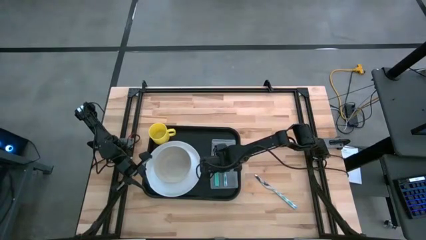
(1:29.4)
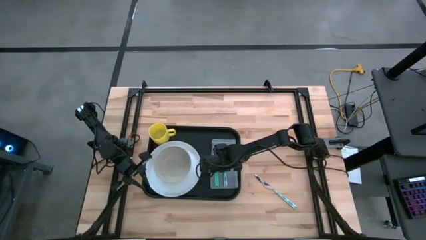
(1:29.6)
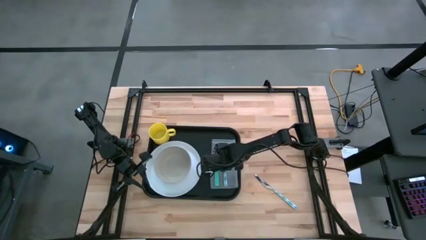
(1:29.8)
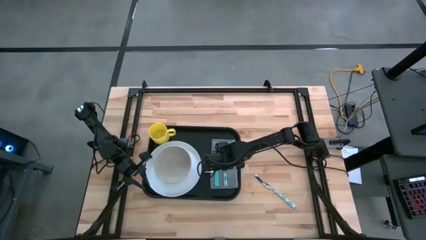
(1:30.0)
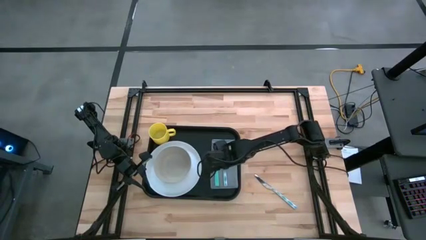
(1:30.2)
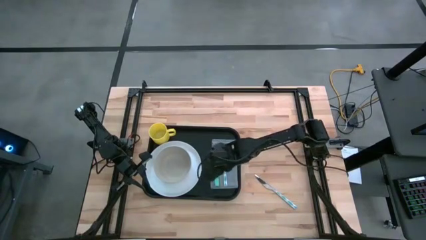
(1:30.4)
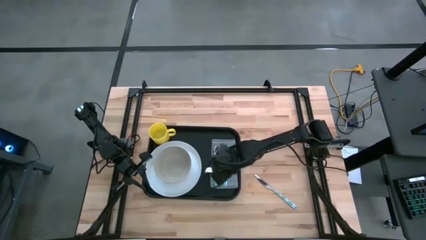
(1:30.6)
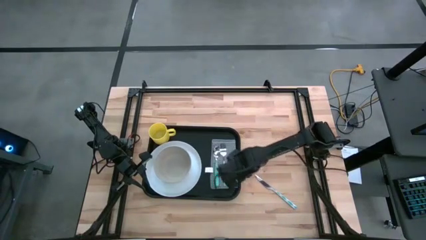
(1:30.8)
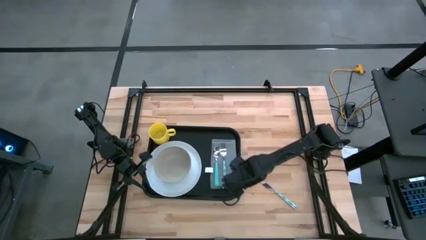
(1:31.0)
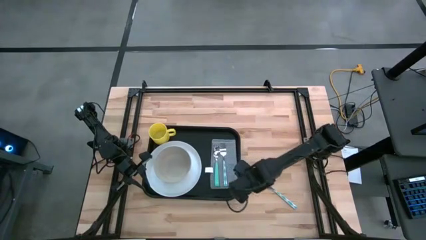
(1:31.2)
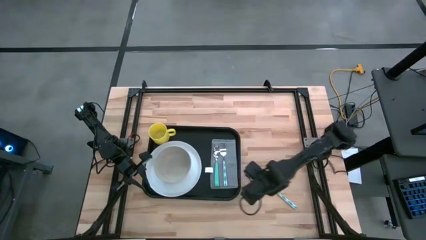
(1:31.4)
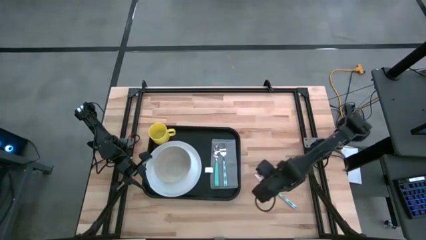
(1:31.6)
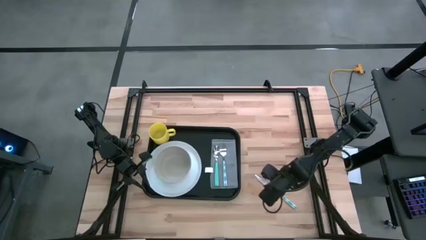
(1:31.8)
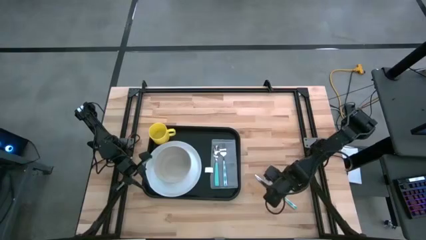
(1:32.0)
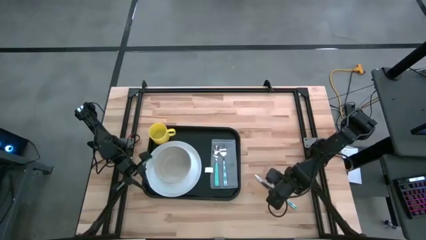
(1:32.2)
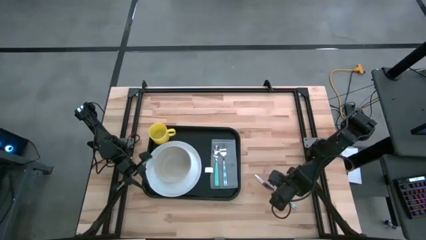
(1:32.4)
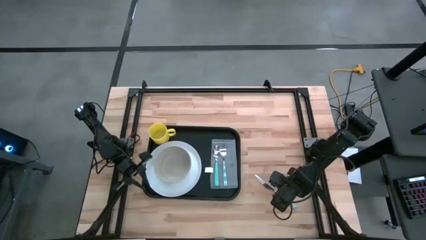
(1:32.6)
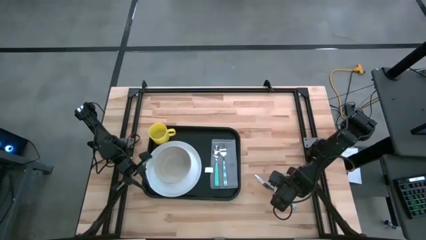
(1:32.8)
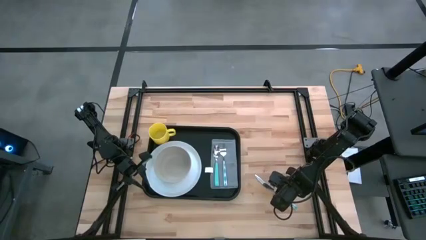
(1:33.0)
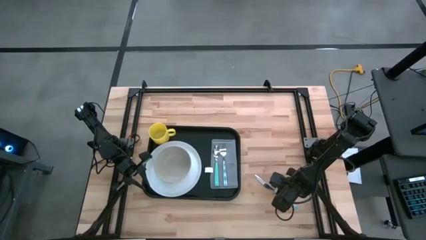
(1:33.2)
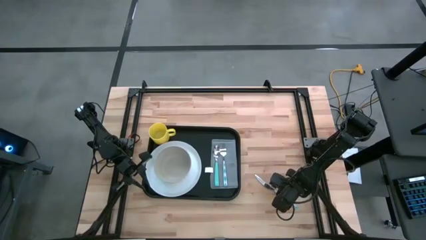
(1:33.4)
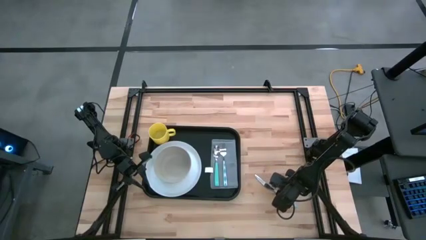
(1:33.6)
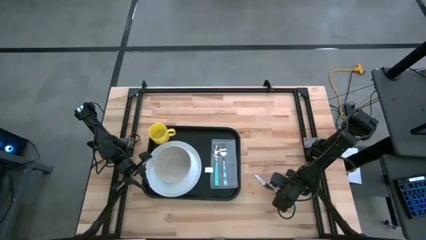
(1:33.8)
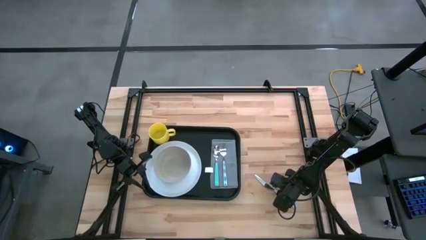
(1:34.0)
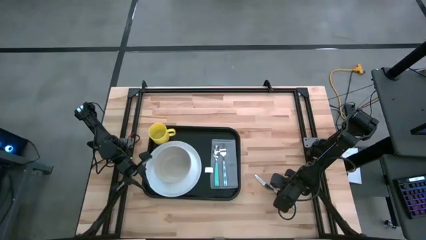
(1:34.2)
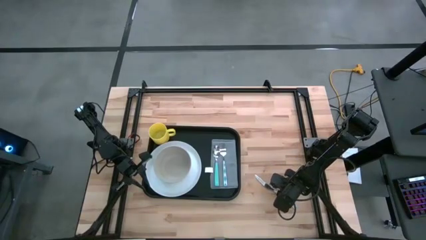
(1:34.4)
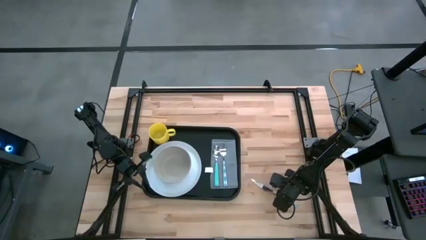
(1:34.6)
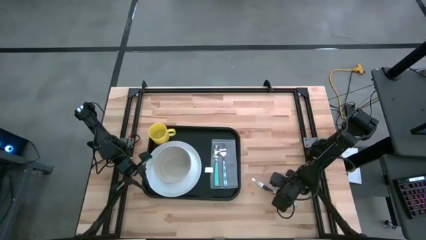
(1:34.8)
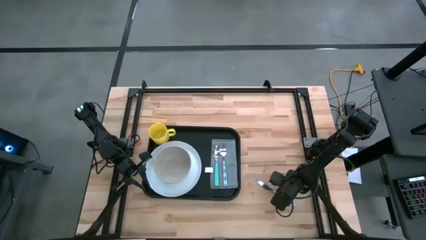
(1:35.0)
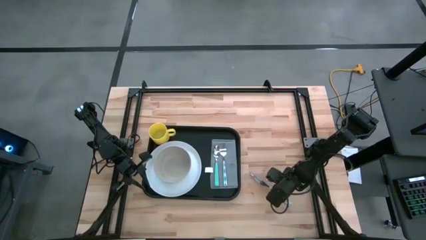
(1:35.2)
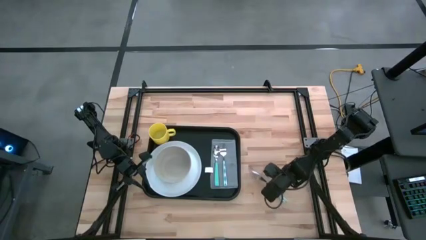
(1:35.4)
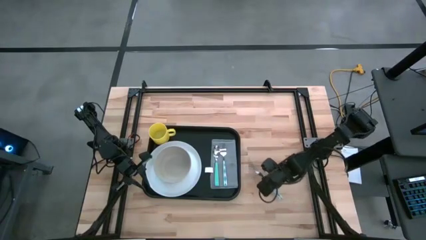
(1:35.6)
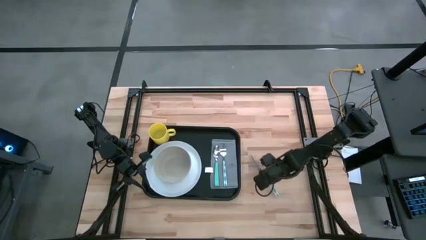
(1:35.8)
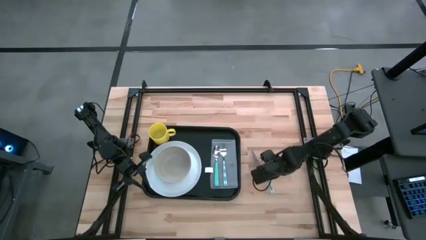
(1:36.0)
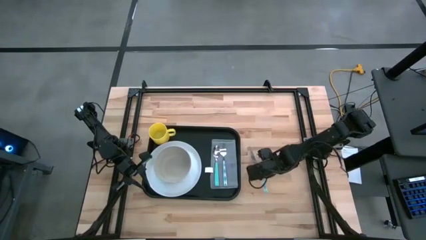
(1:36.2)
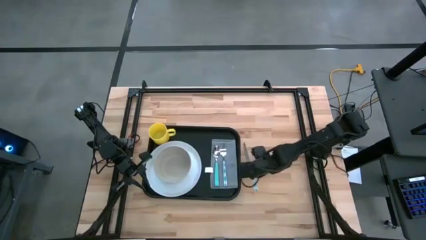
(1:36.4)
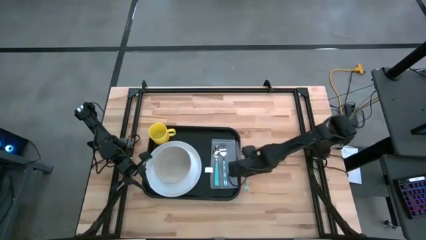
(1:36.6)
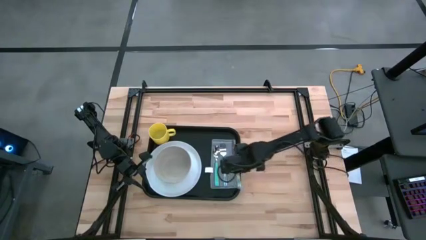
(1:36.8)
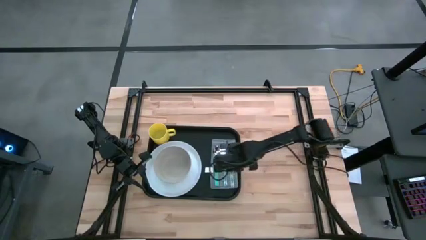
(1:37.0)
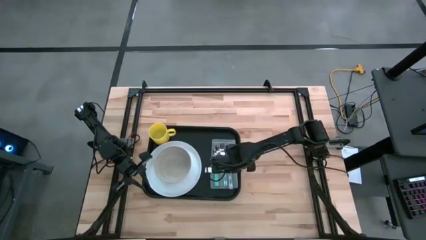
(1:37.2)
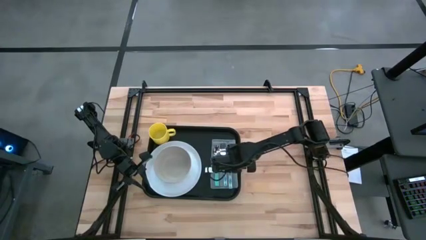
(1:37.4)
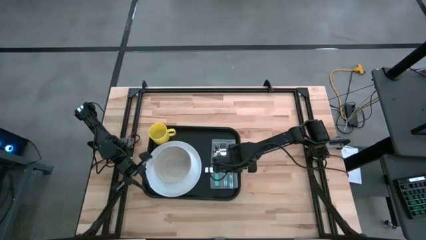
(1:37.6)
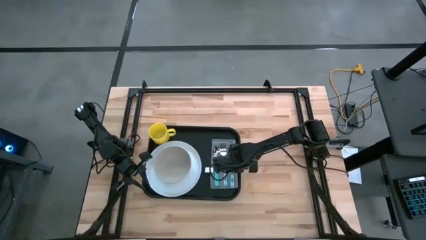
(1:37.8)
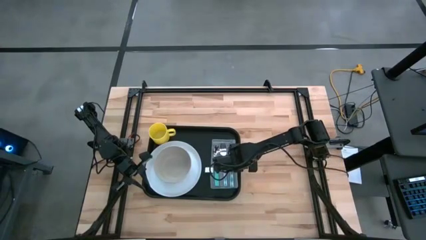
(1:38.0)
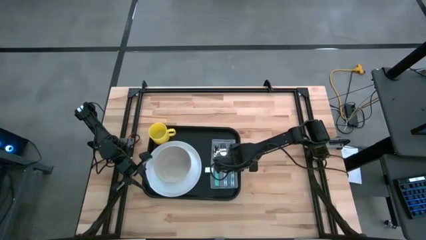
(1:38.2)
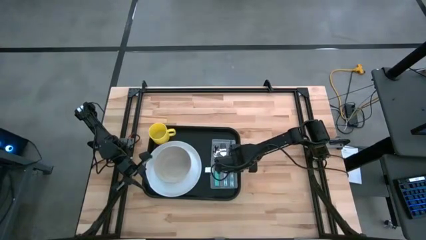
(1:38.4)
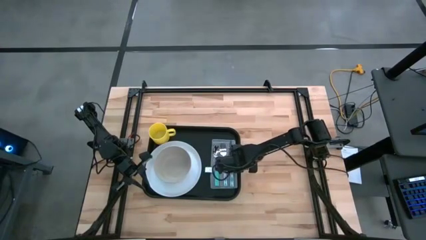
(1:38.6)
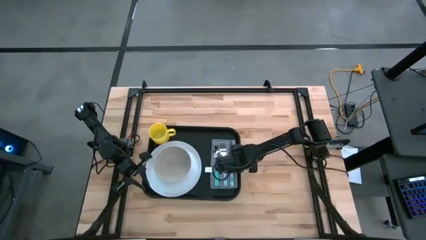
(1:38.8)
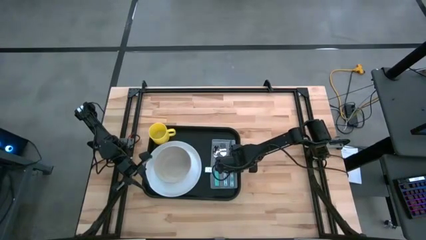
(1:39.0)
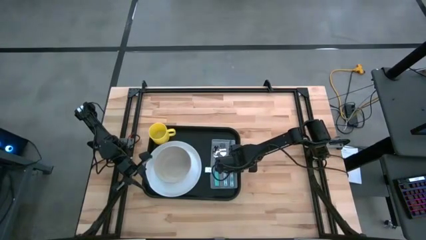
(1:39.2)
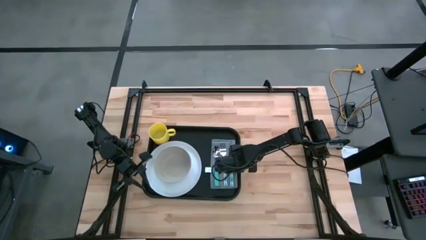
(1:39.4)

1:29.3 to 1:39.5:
Task: Set up tray
Put the blue knife on the gray napkin to the right of the blue fork

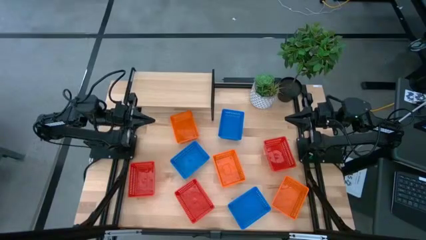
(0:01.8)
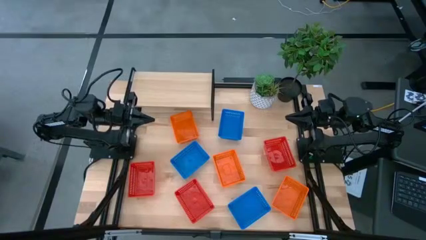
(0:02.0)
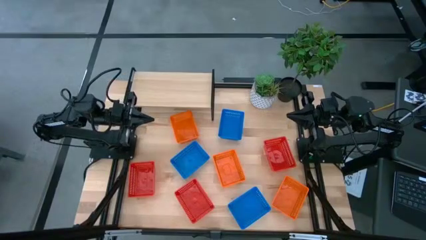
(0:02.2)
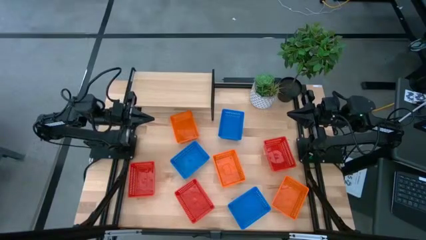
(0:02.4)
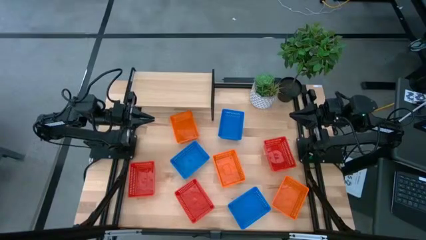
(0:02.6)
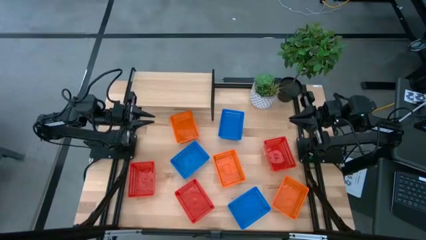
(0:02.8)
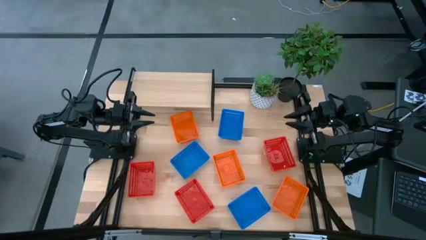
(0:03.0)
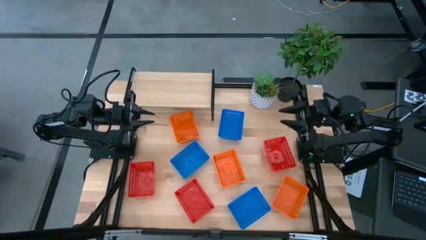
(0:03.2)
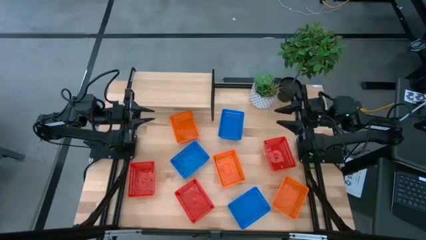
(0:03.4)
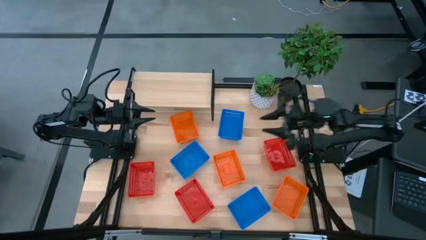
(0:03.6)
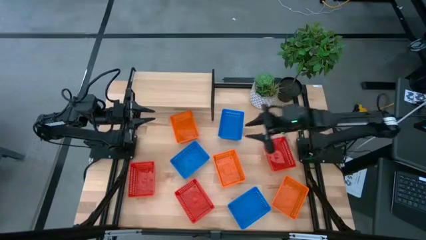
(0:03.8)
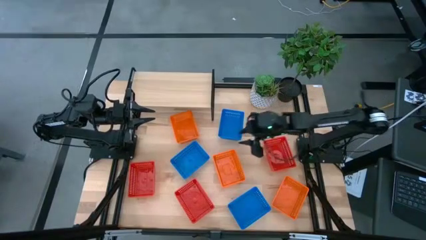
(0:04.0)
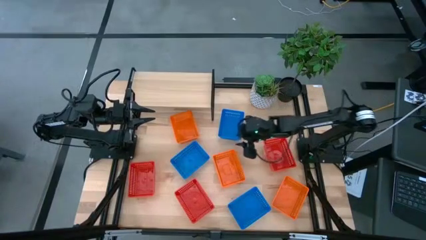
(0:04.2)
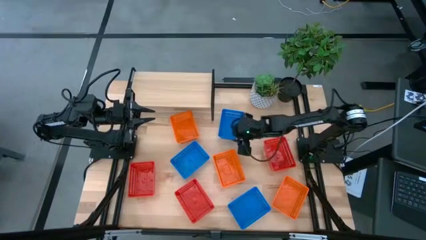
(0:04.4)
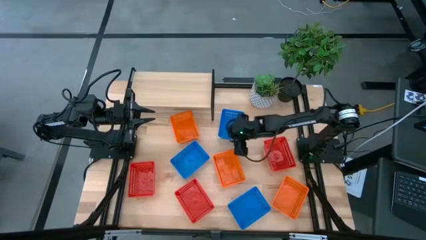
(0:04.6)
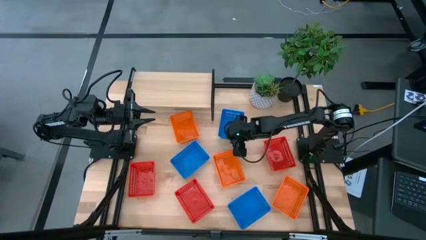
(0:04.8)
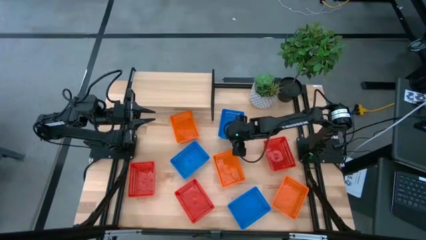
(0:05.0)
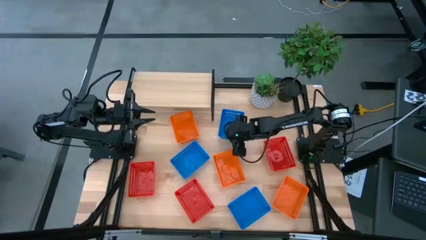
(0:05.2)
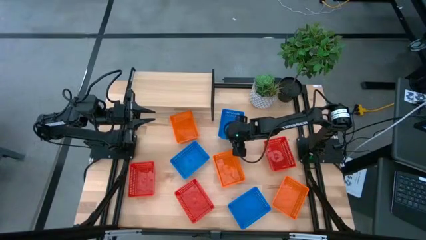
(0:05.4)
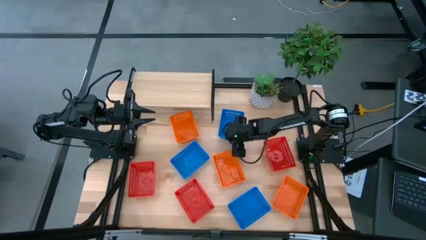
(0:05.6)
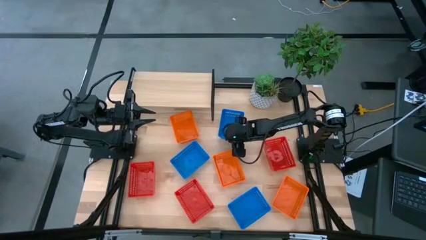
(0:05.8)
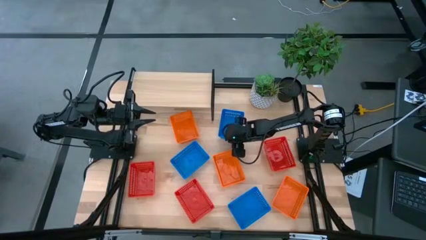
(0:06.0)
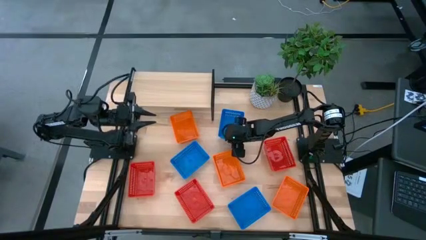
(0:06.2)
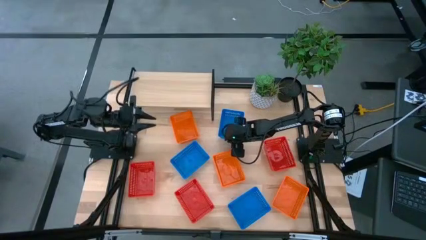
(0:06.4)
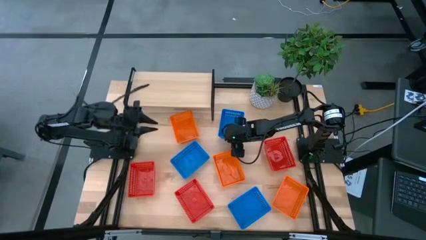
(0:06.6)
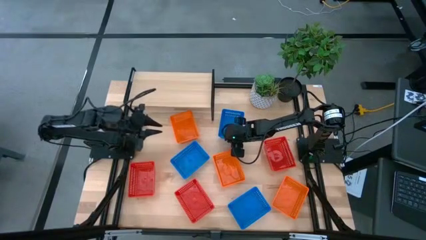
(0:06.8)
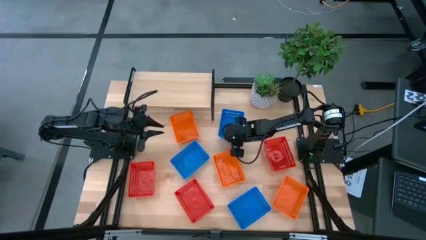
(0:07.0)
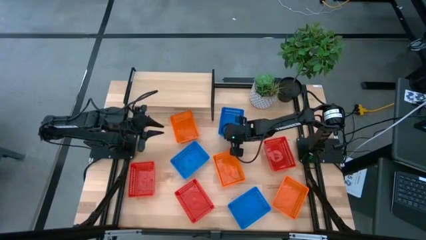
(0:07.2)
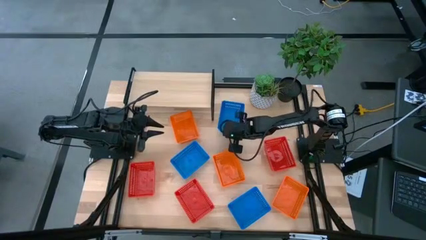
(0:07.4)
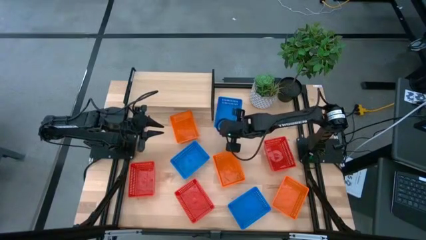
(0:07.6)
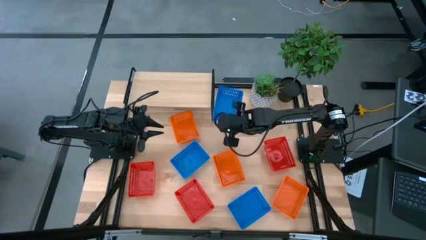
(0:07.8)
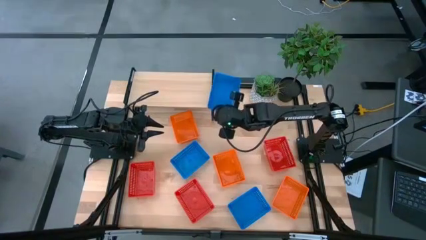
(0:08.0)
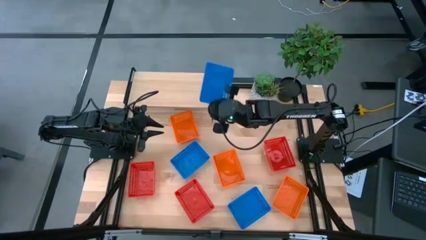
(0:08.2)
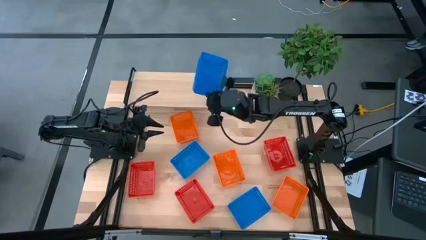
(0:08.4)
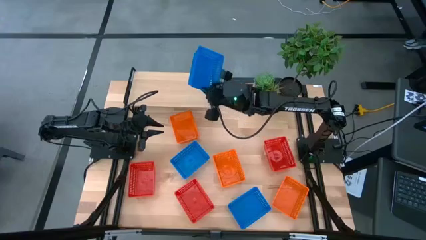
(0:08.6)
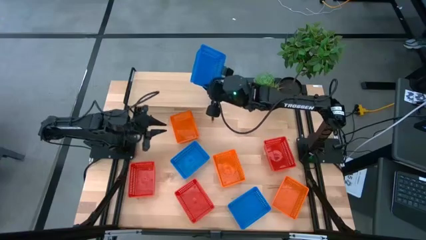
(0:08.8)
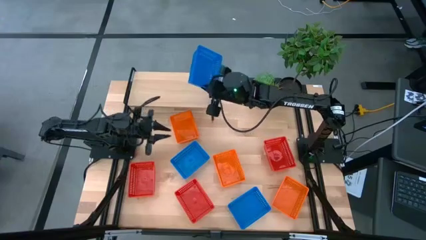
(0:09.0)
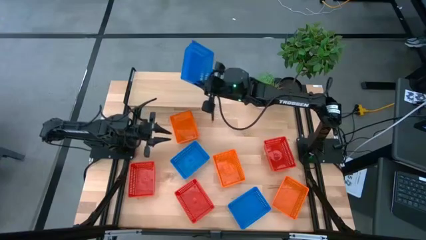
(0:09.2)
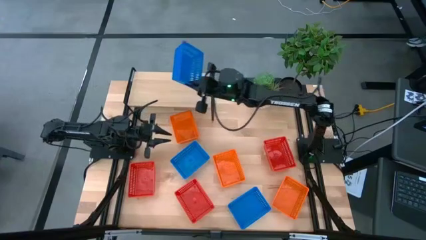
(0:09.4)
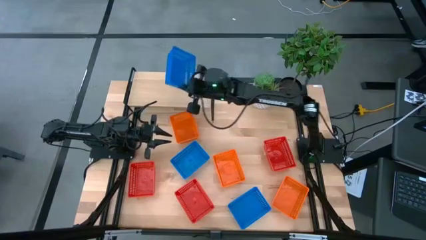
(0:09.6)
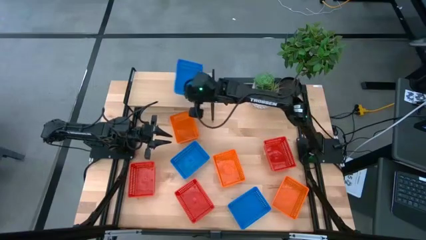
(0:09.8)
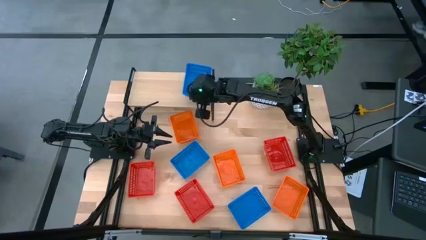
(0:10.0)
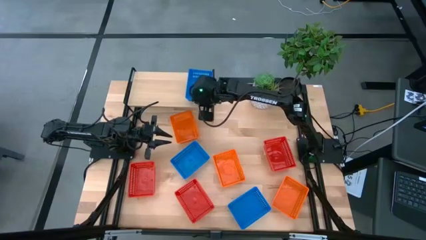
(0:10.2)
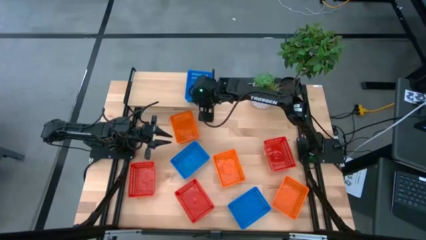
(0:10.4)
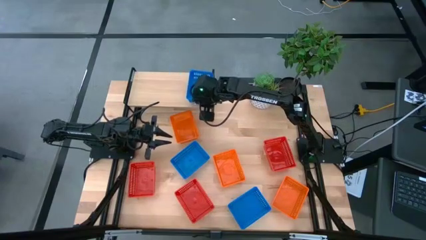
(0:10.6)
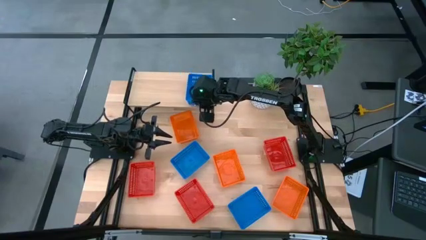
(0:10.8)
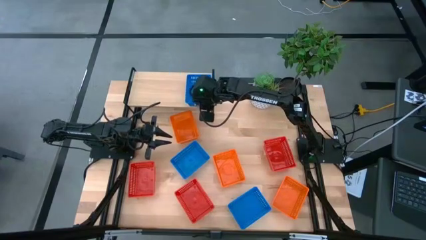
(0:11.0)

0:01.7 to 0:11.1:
Task: Stack baskets on shelf by color
Put the top blue bin on the shelf
